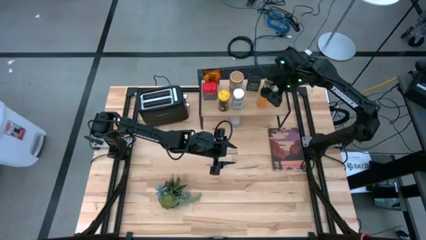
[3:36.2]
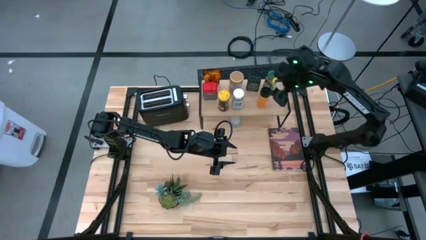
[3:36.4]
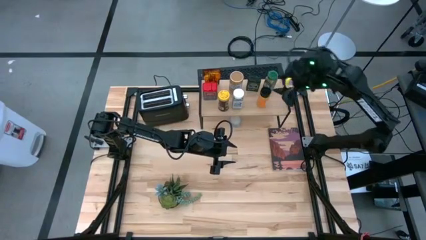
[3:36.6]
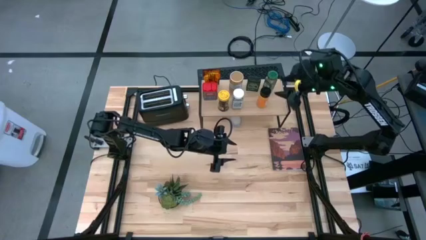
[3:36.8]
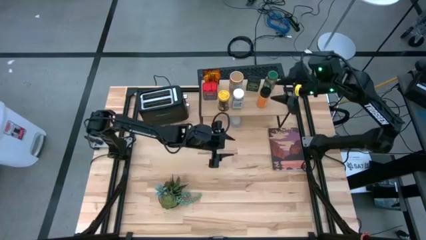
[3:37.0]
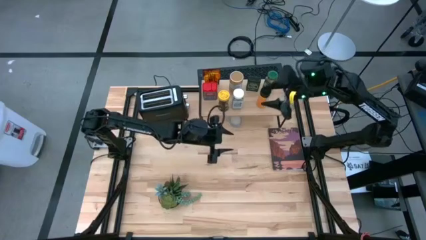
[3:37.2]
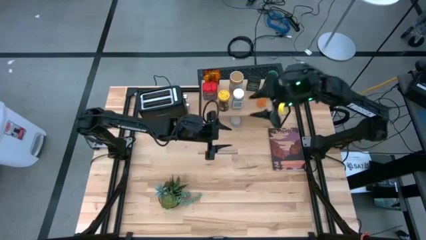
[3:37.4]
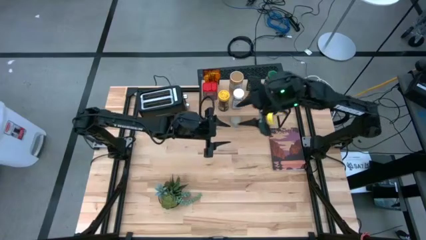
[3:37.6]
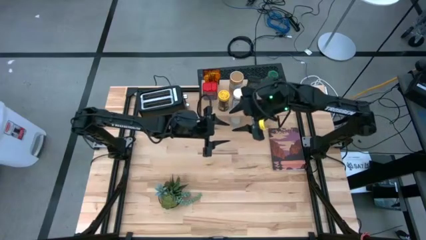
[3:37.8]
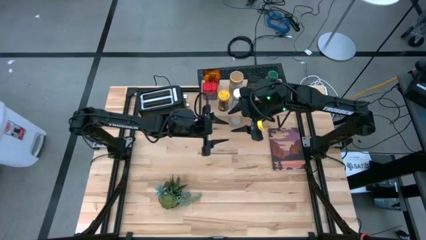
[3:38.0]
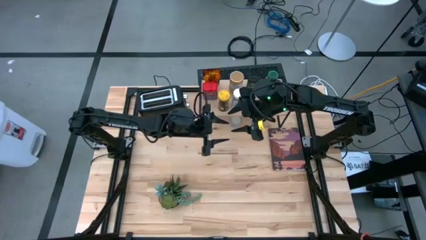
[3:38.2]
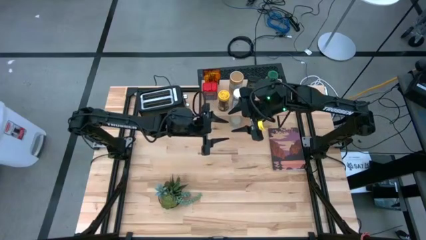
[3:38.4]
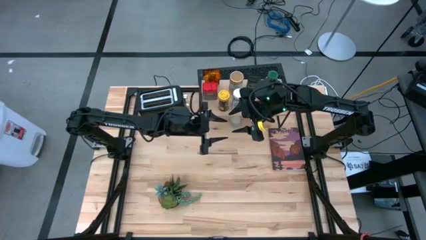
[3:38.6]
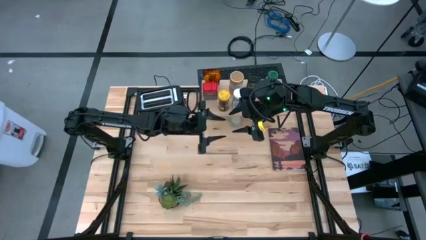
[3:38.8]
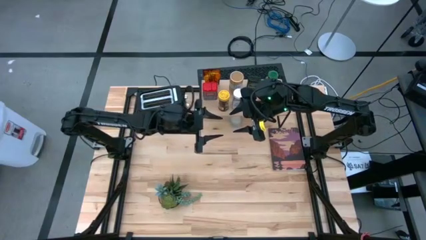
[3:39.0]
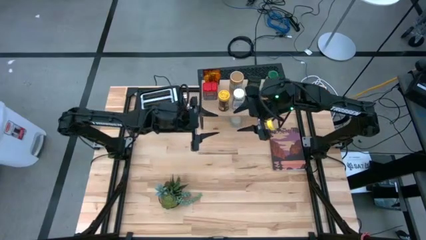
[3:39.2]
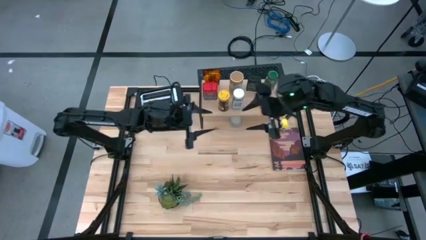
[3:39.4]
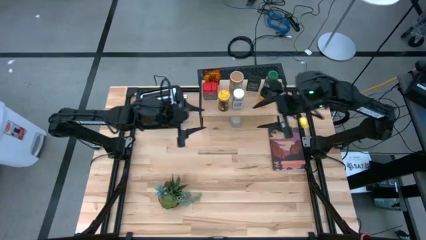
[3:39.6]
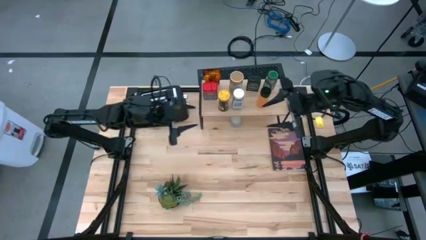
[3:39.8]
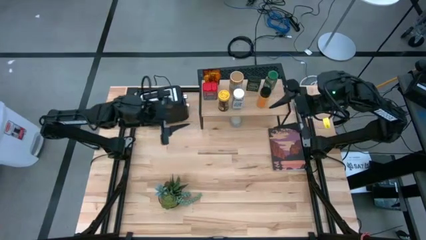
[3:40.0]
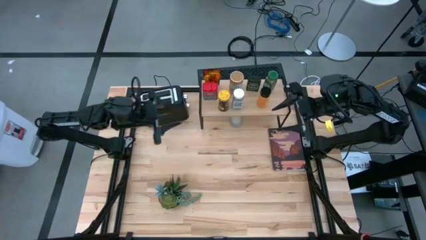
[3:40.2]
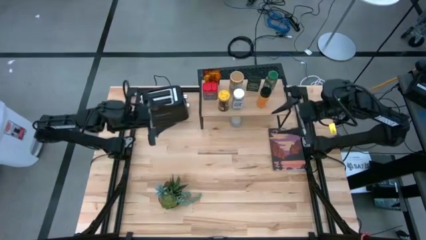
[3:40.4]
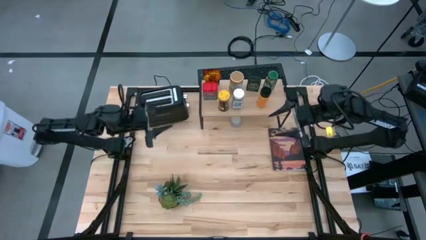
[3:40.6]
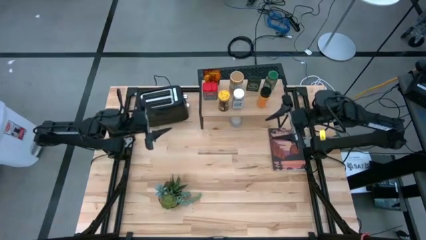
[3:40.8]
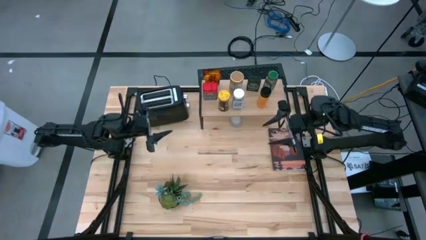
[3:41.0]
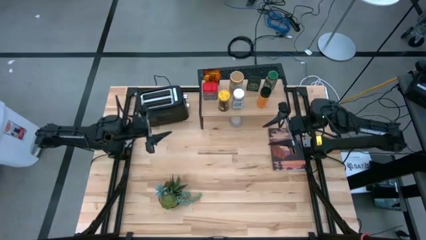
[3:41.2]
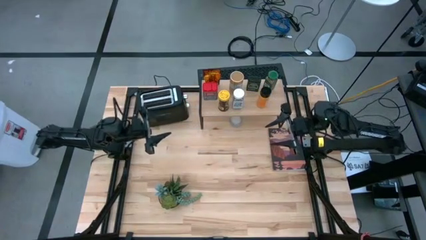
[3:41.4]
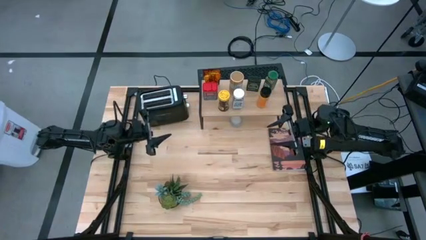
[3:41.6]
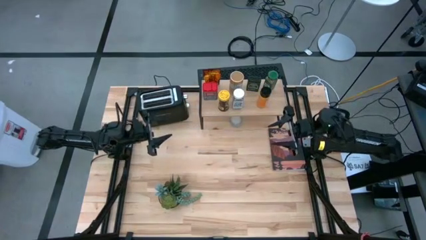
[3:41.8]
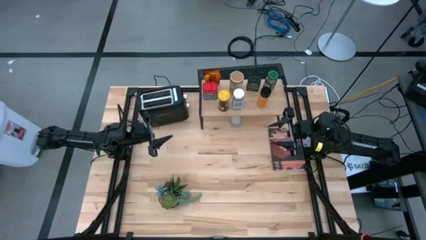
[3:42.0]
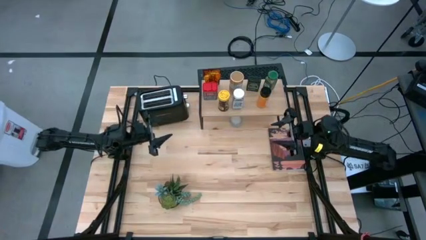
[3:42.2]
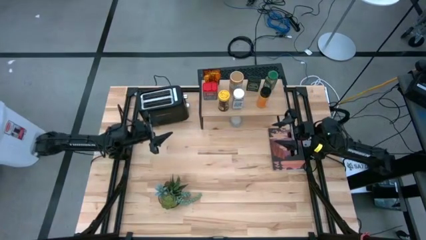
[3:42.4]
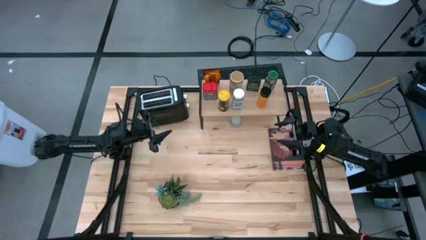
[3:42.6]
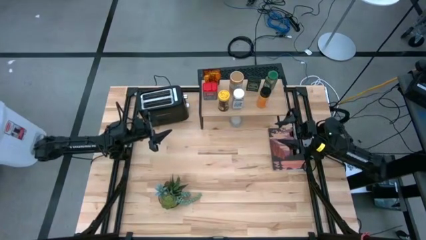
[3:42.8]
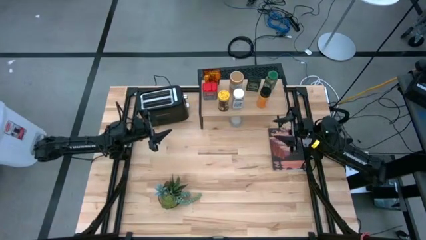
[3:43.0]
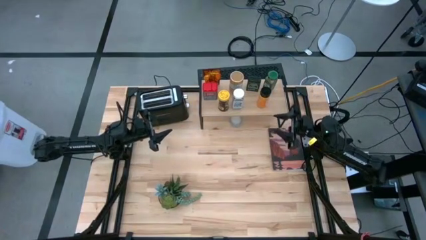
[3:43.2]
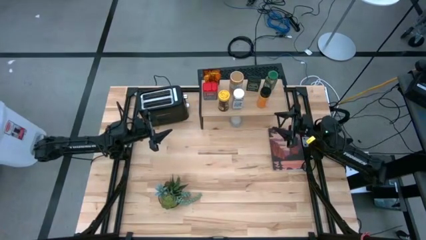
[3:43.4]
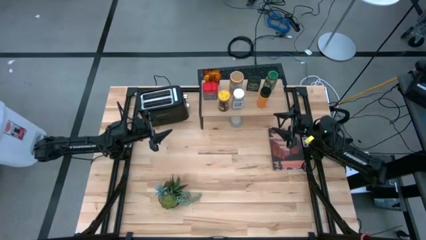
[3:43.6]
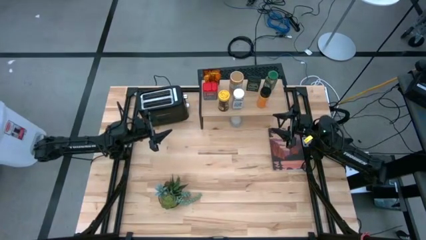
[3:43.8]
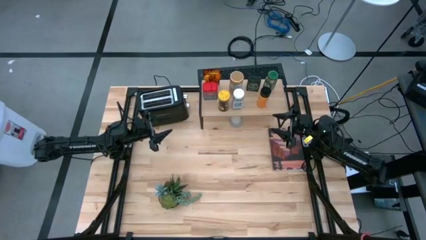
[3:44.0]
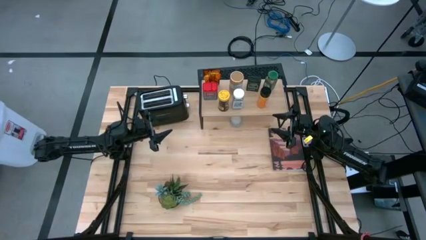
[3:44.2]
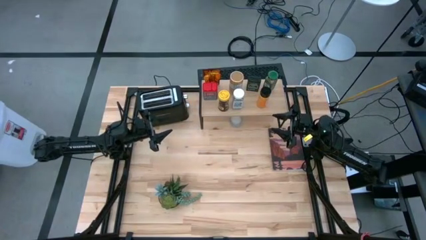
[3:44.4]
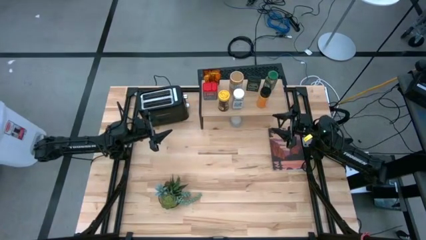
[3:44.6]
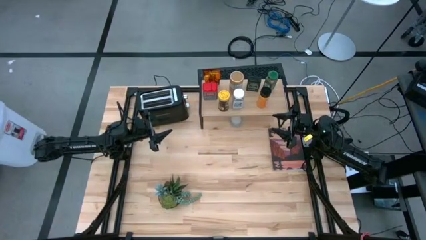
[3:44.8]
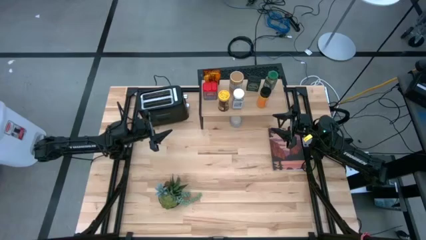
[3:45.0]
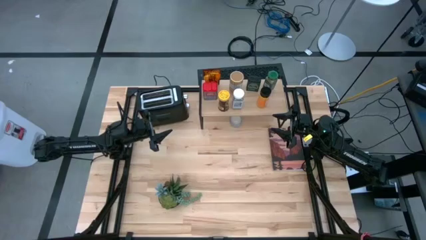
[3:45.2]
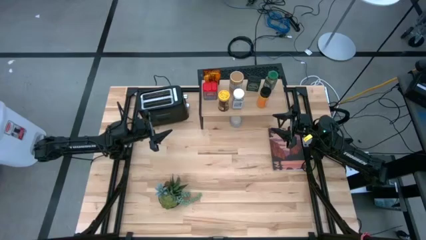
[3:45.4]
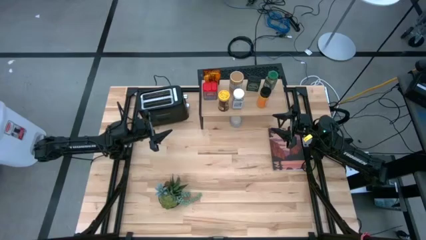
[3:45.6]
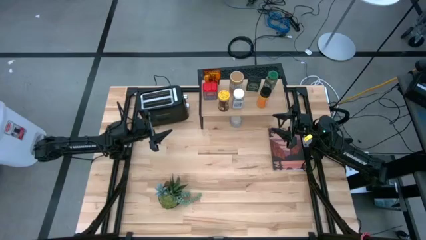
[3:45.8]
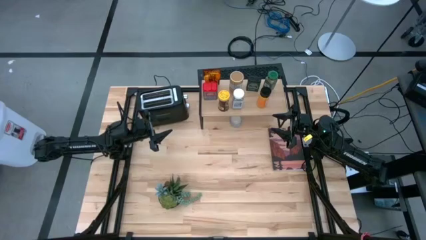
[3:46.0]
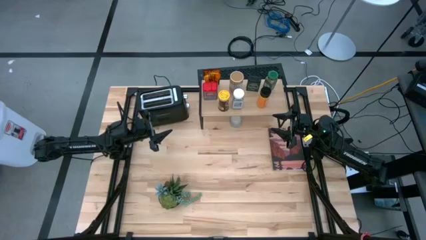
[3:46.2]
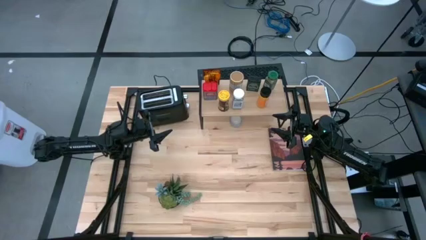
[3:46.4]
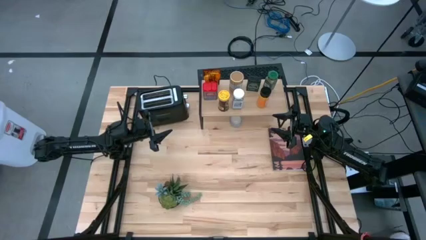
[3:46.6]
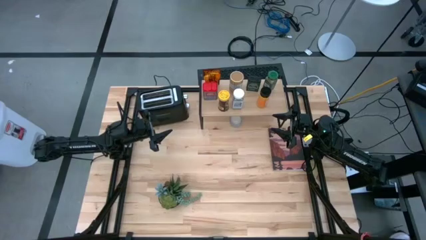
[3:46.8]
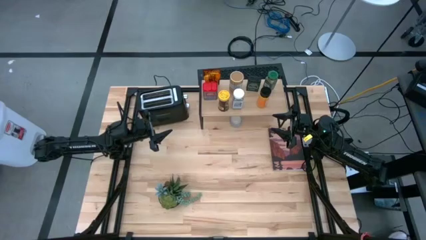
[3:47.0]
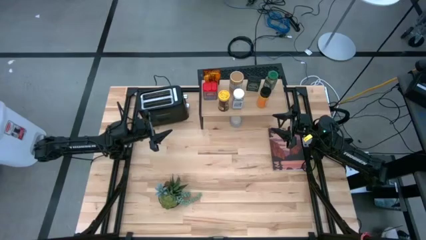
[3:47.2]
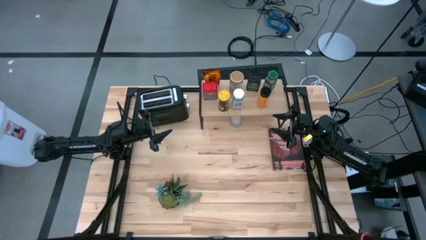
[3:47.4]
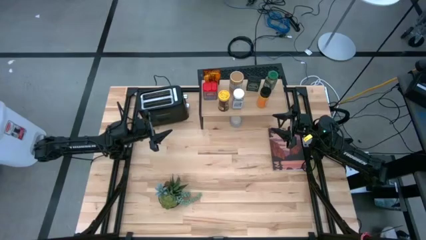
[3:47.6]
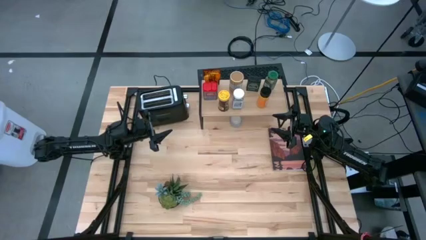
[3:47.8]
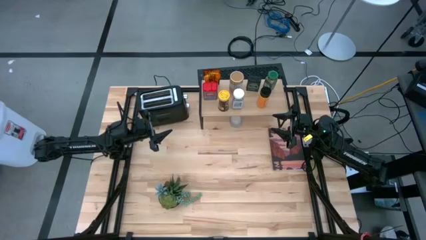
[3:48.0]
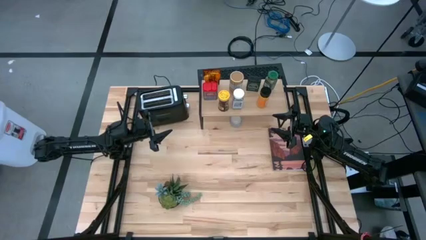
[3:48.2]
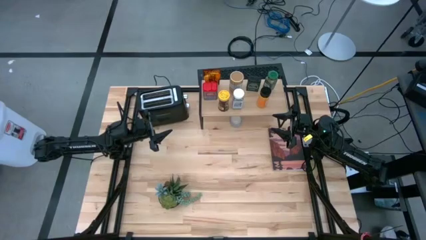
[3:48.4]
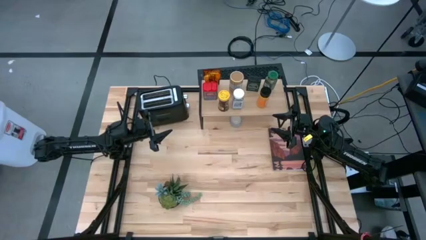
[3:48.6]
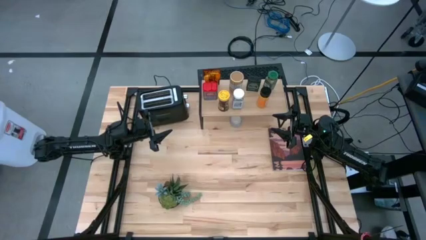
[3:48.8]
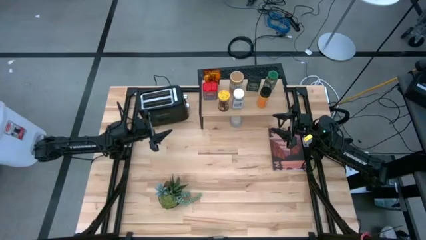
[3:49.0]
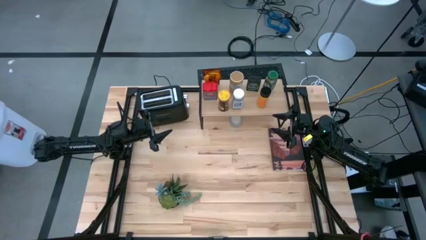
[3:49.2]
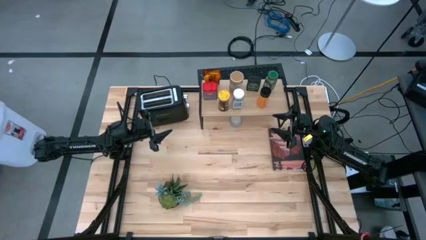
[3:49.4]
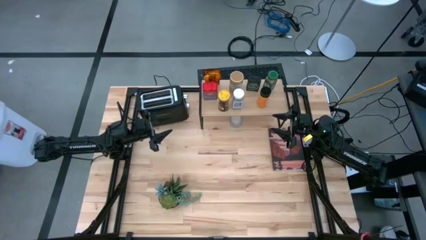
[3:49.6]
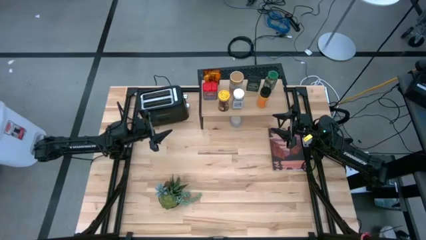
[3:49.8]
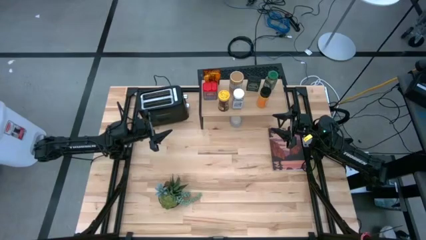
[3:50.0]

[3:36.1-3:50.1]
Task: Shelf spices
Return to Home Position

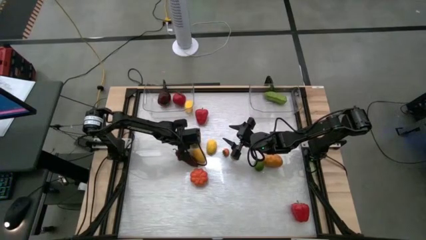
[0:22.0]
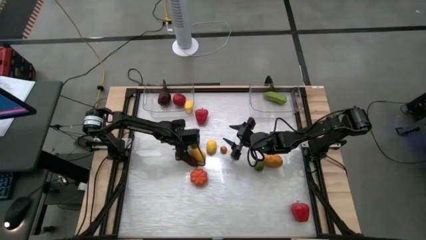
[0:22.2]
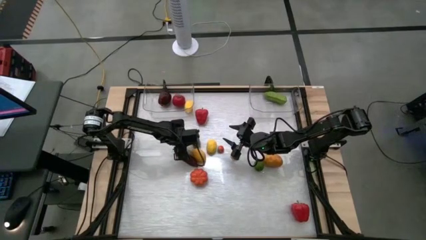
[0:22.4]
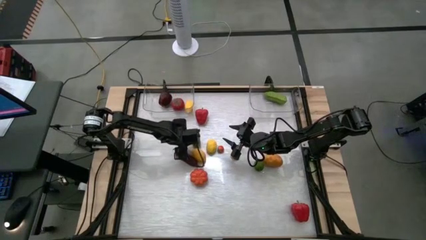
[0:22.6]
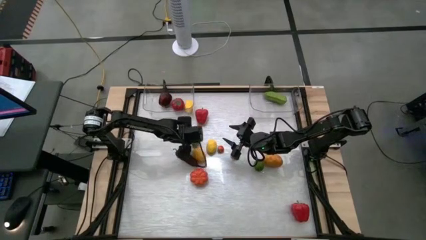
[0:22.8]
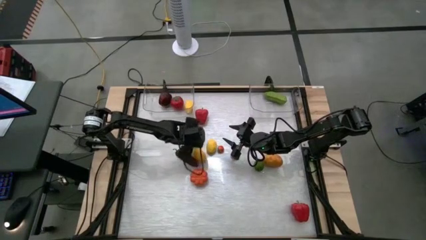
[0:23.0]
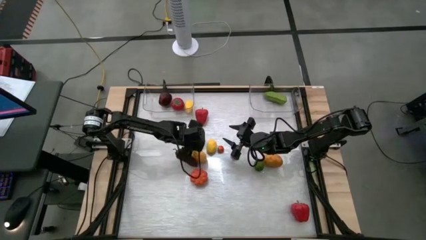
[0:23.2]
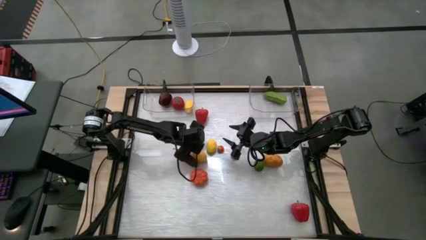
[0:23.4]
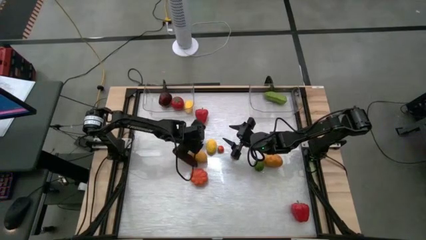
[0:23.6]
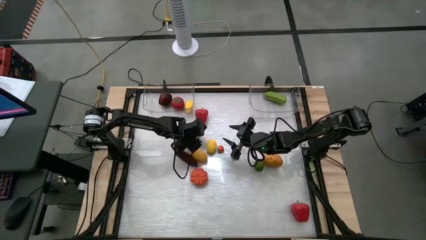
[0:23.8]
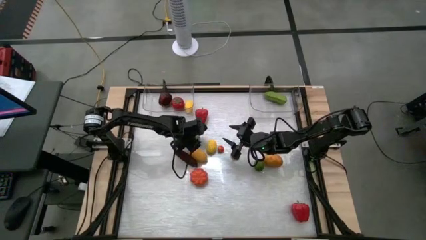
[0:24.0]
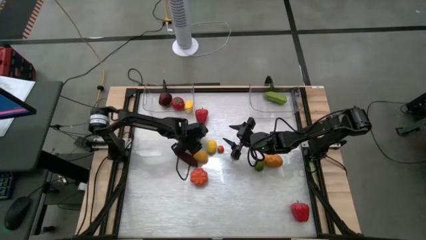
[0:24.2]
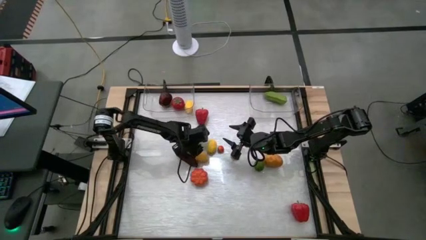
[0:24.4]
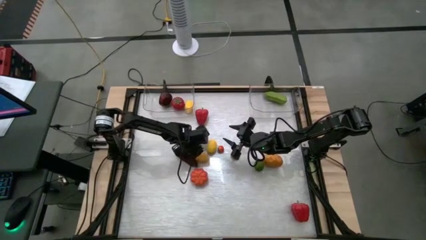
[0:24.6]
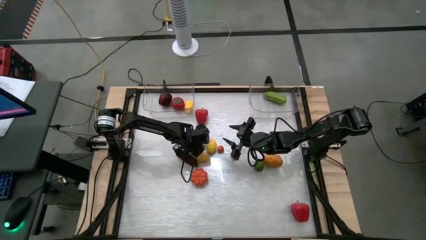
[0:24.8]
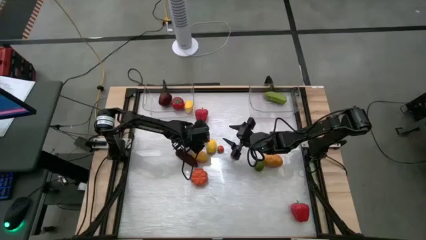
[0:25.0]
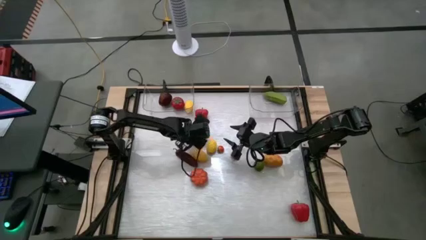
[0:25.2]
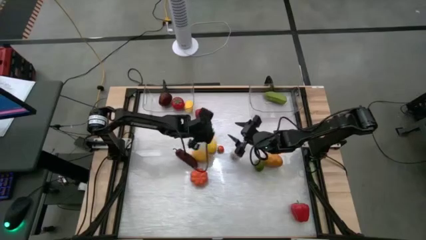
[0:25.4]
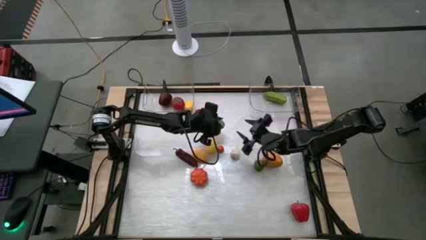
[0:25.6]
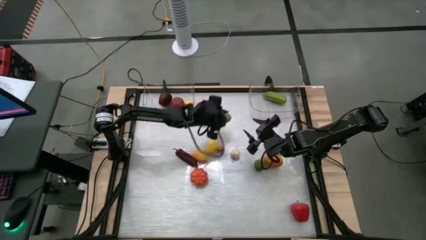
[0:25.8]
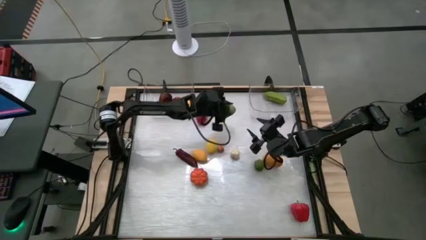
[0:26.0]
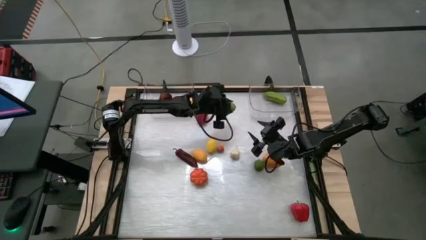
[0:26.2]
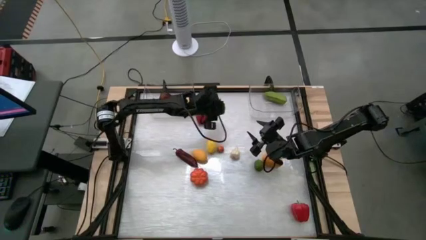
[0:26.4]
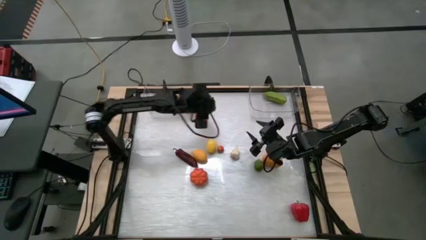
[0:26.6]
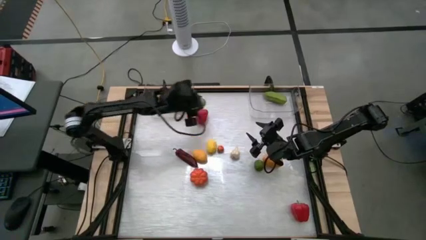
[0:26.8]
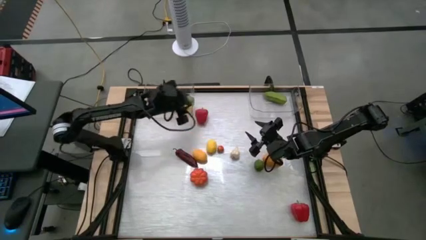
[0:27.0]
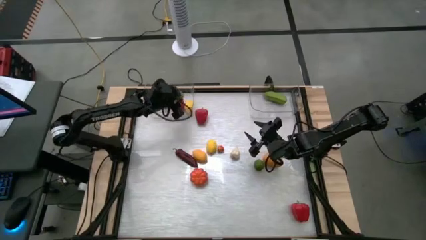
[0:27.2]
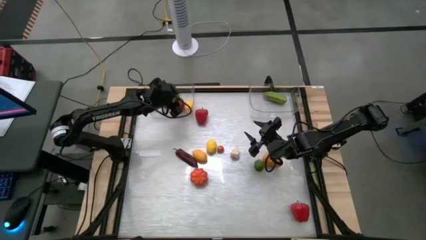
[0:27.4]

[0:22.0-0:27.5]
Task: Sort produce into baskets
Put the left green lime into the left transparent bin
